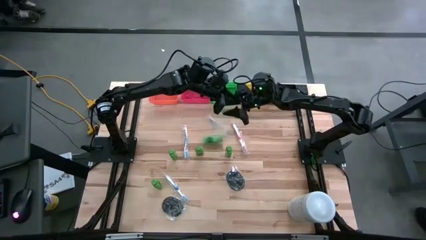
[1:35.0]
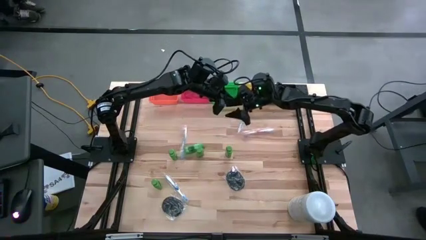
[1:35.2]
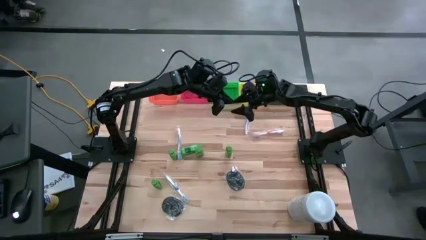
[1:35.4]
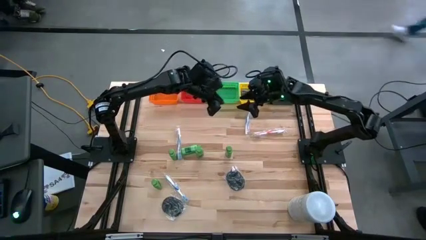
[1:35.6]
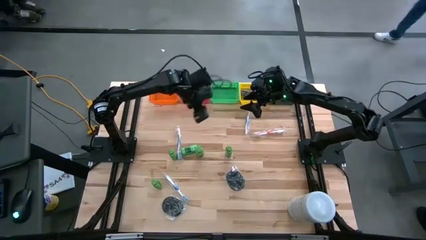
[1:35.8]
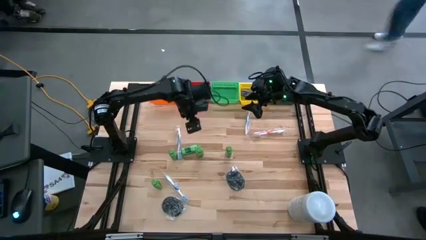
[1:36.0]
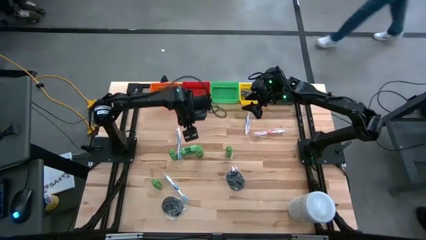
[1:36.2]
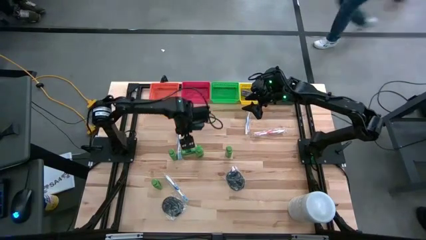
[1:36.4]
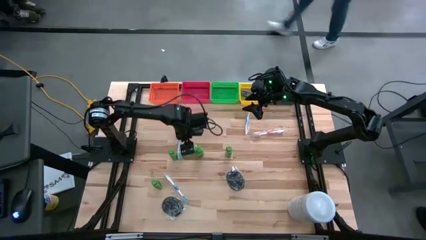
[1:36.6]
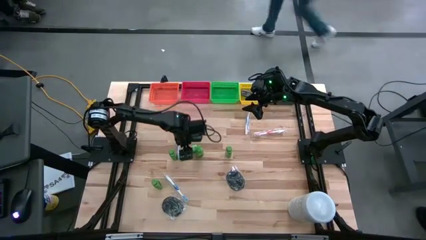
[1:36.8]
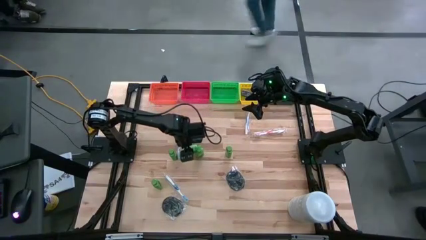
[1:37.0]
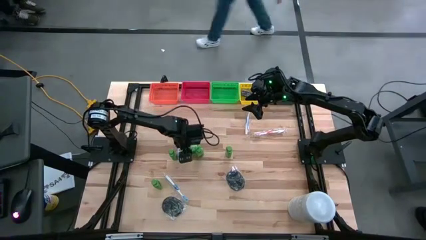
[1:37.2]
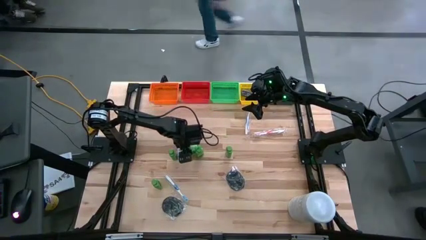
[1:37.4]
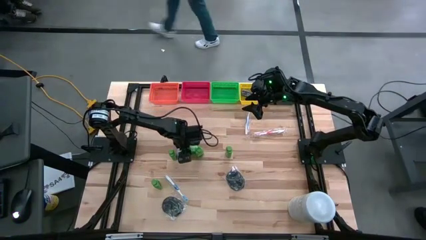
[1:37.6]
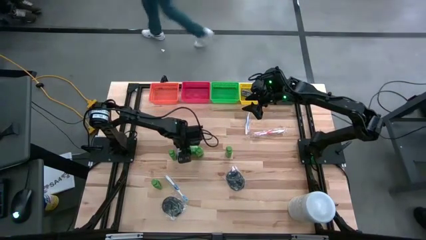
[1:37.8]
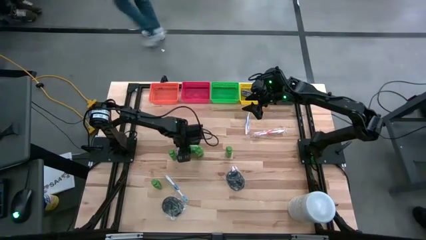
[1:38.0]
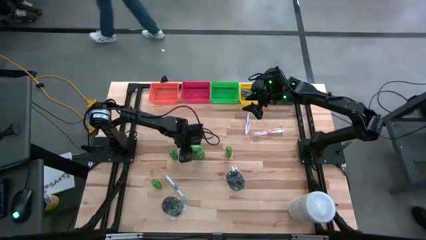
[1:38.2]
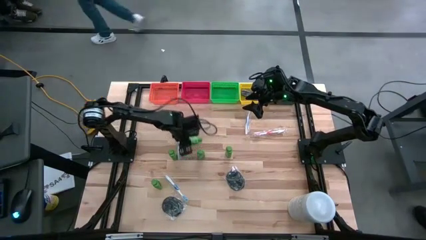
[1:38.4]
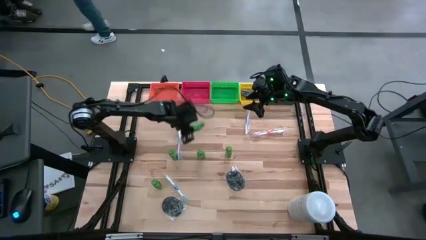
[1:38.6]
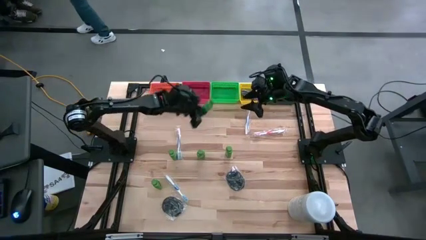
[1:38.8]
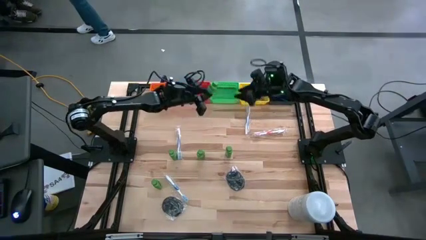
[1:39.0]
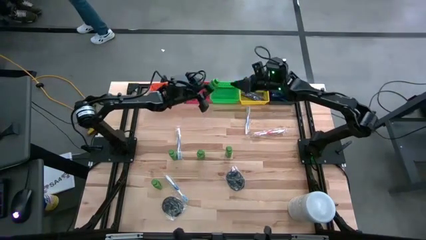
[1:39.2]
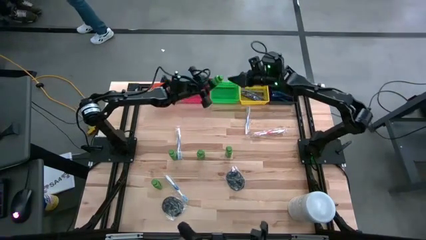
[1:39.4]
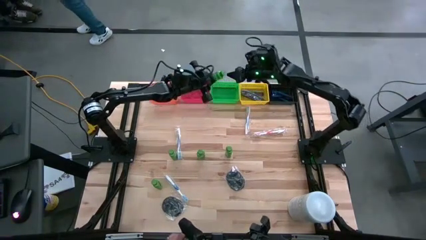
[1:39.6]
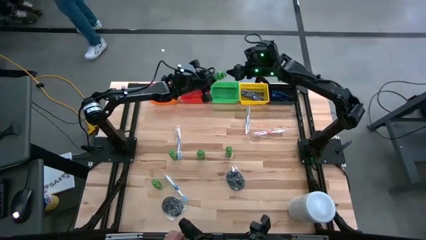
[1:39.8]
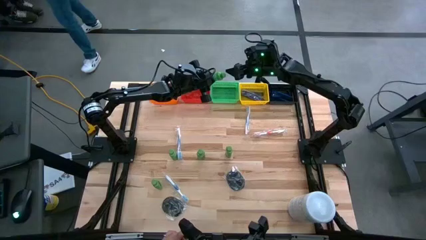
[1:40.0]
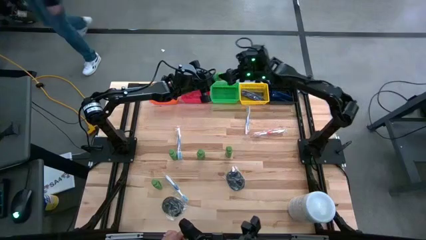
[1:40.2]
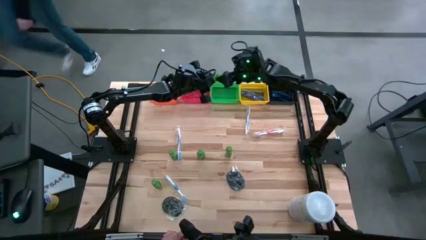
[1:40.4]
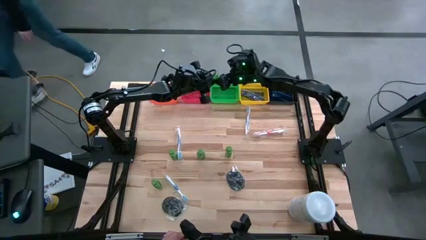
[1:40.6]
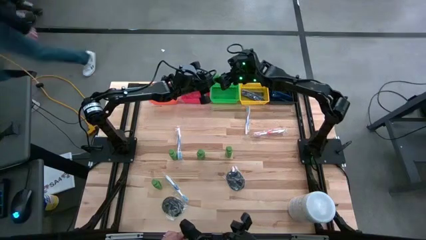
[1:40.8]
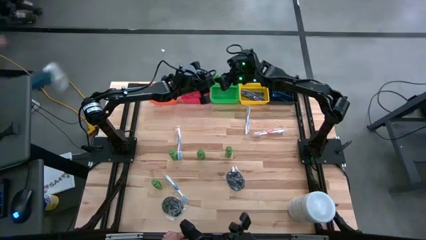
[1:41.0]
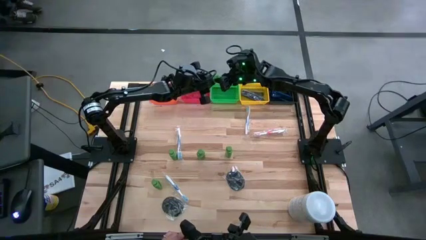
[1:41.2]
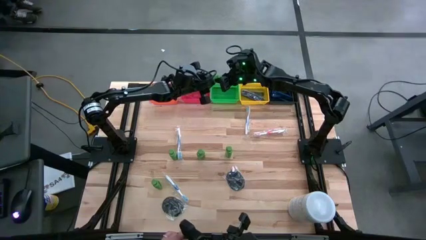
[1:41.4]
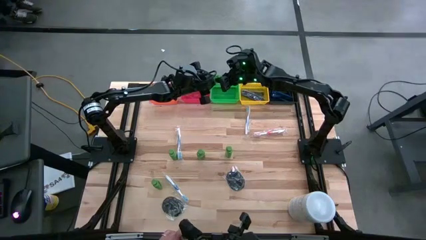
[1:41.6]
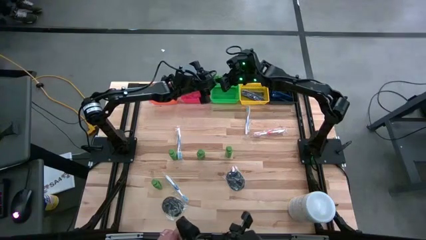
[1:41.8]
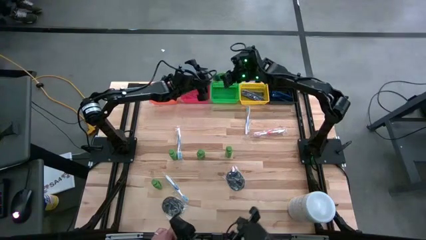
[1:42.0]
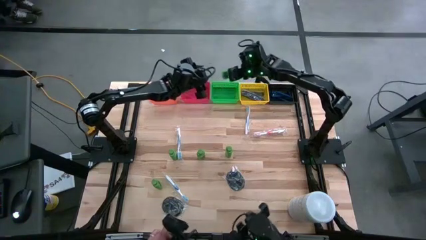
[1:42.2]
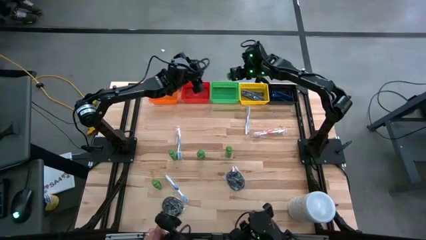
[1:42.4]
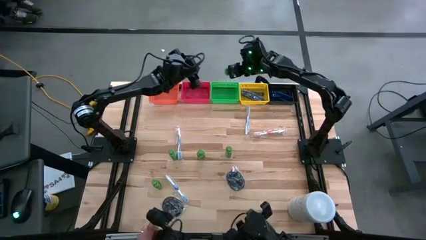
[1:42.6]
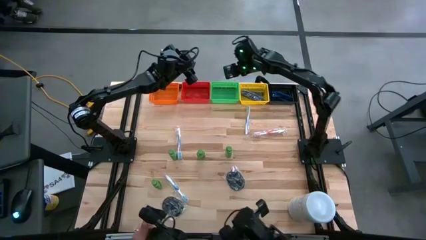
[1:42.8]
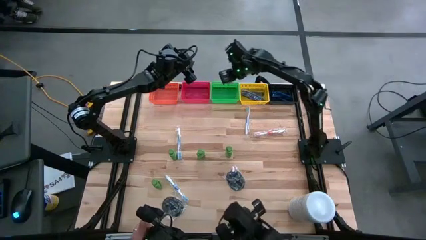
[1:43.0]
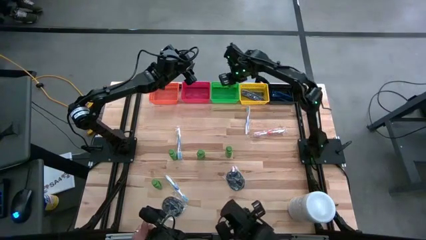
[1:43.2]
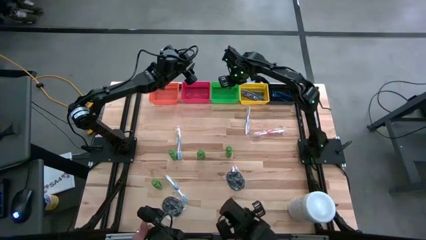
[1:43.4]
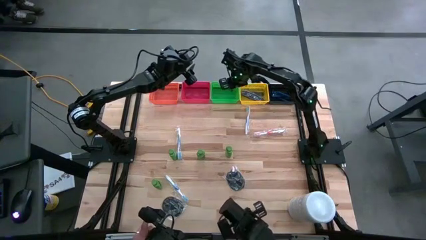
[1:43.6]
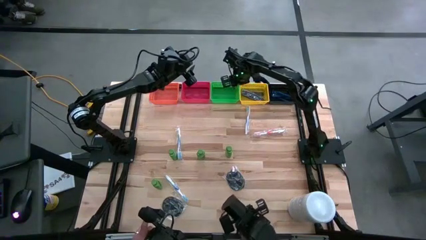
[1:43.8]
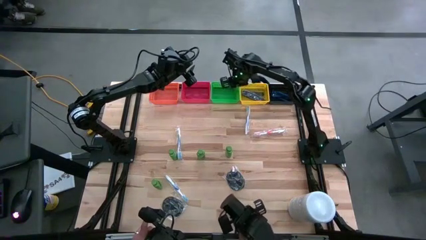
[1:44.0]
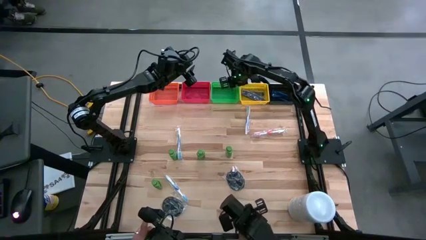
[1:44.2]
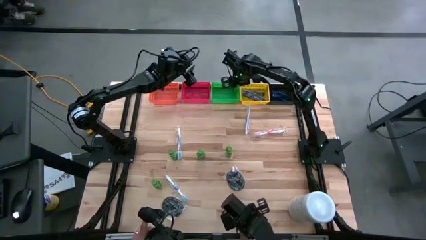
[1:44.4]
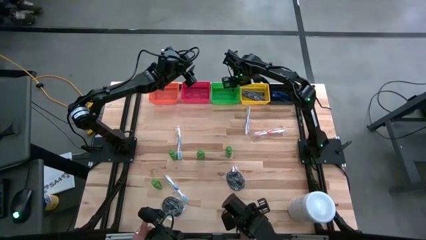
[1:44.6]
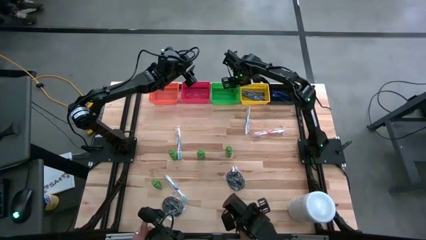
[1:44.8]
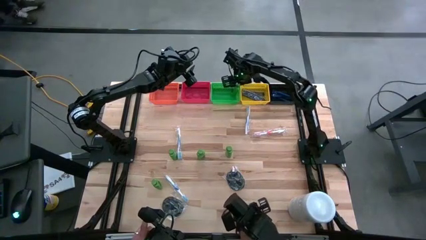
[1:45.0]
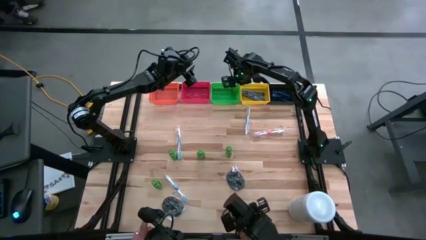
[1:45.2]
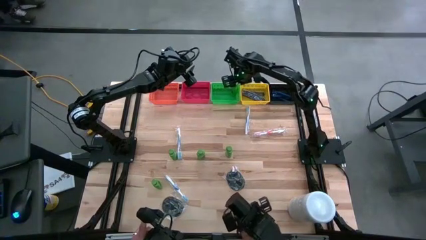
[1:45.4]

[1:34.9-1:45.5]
Task: Pick & Place Travel size toiletries
Put the green shampoo into the green bin

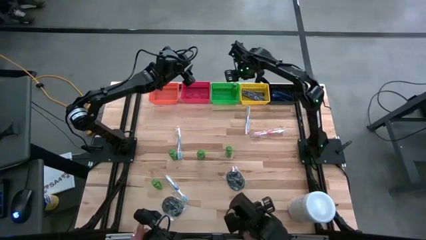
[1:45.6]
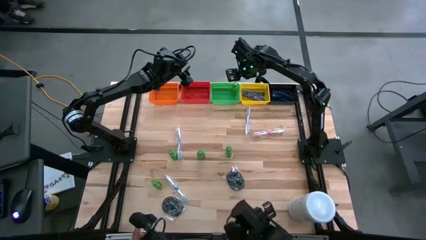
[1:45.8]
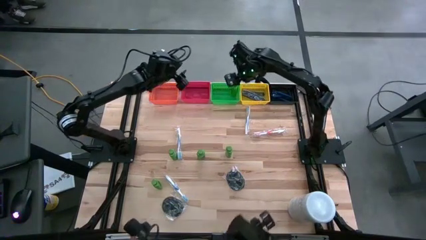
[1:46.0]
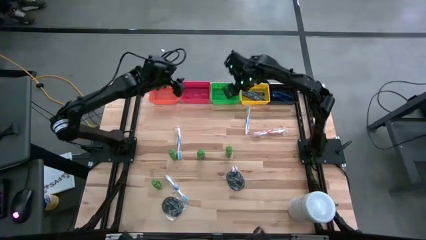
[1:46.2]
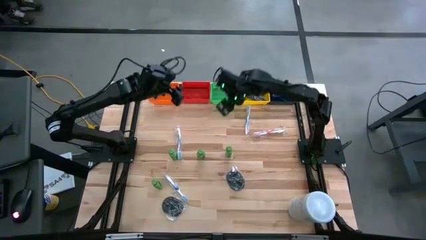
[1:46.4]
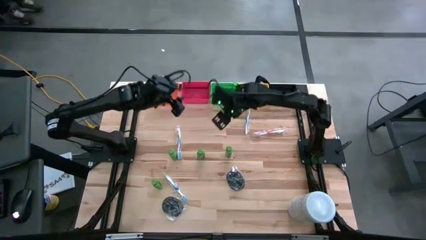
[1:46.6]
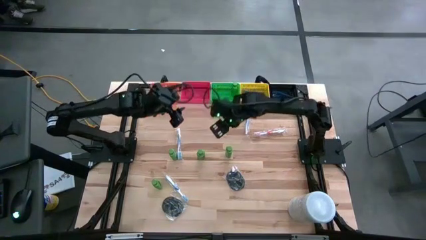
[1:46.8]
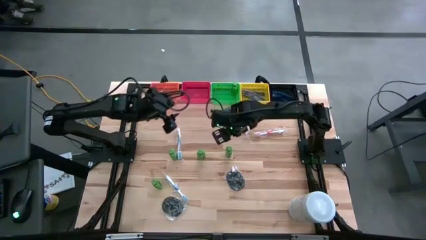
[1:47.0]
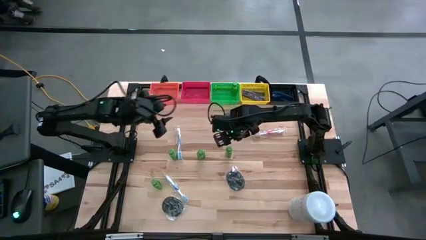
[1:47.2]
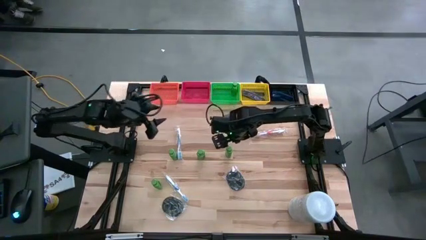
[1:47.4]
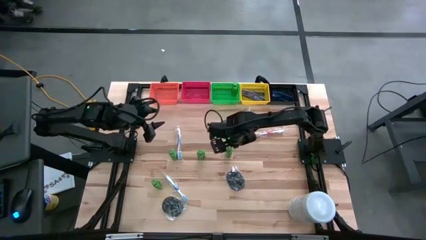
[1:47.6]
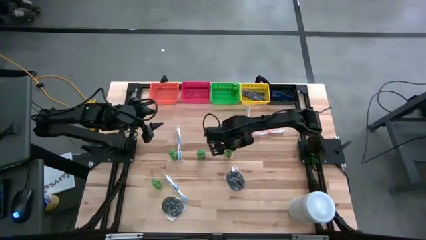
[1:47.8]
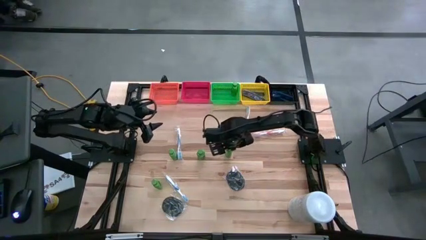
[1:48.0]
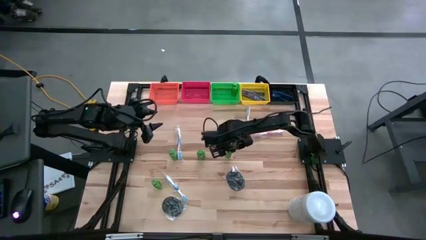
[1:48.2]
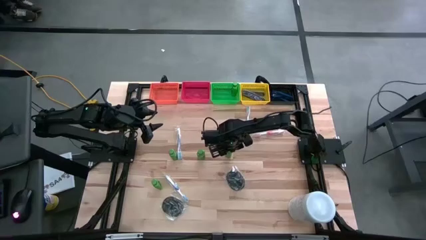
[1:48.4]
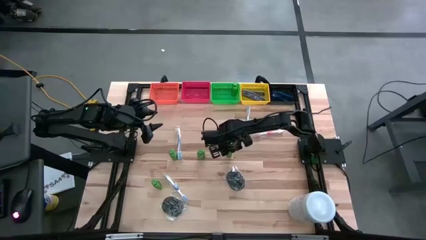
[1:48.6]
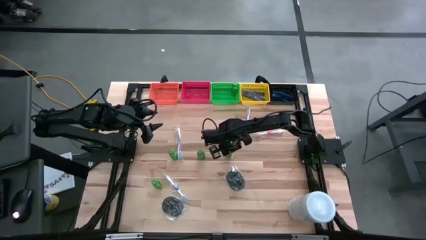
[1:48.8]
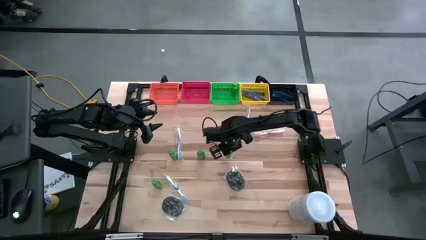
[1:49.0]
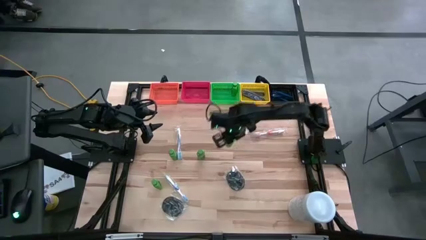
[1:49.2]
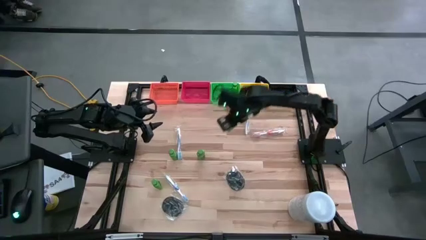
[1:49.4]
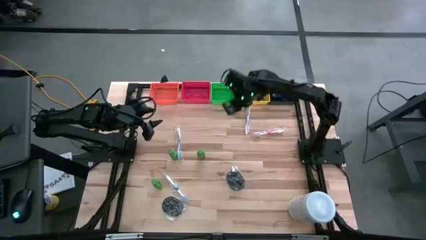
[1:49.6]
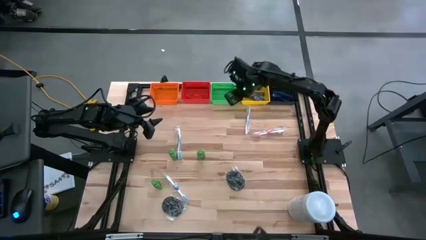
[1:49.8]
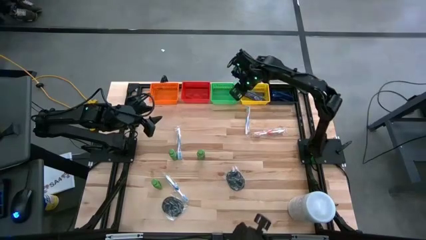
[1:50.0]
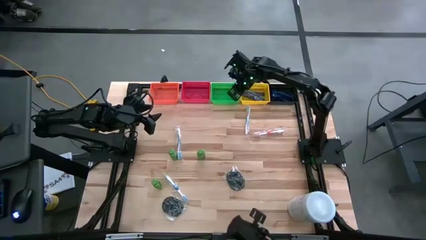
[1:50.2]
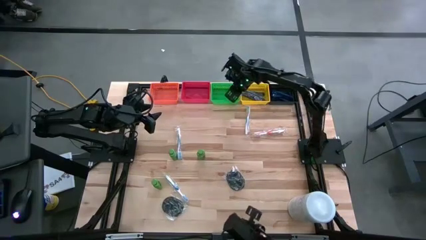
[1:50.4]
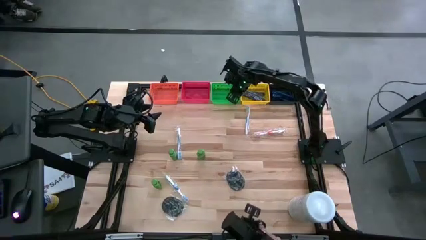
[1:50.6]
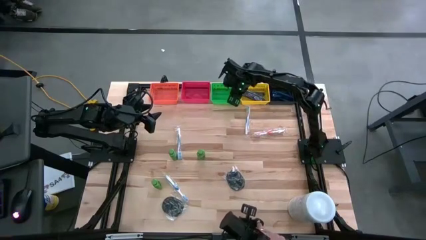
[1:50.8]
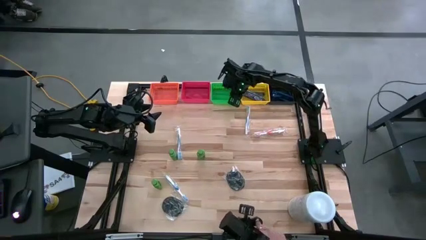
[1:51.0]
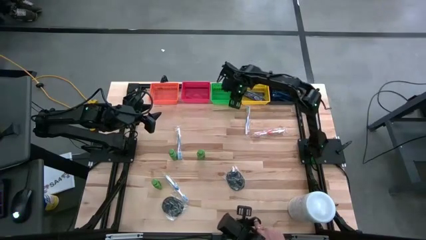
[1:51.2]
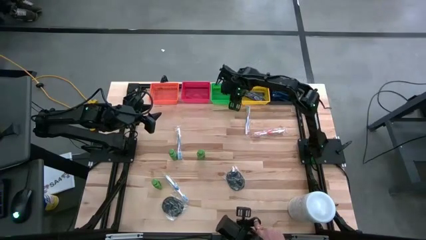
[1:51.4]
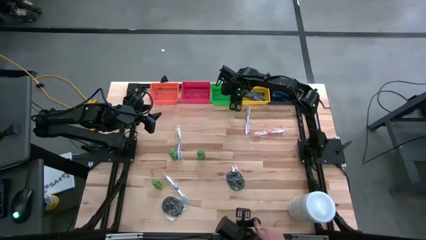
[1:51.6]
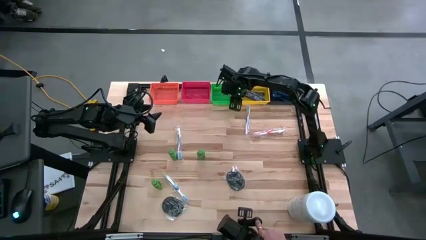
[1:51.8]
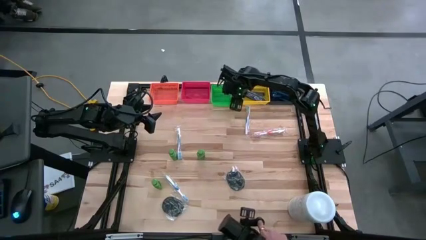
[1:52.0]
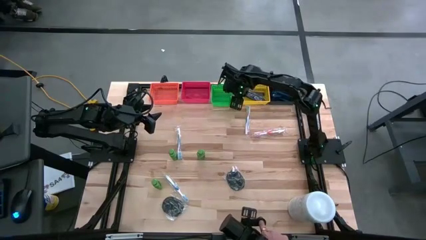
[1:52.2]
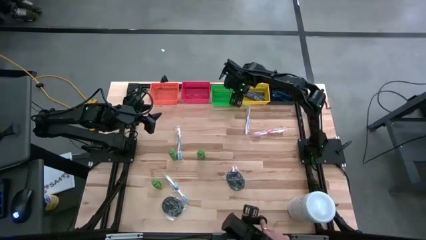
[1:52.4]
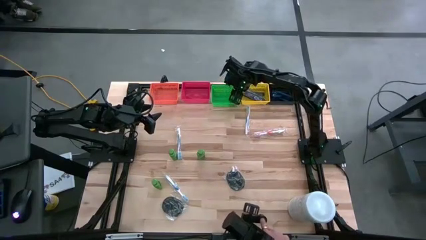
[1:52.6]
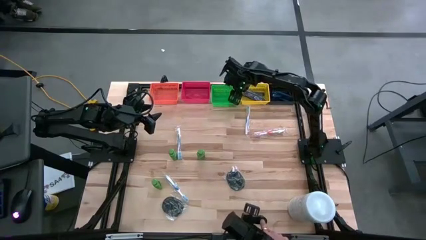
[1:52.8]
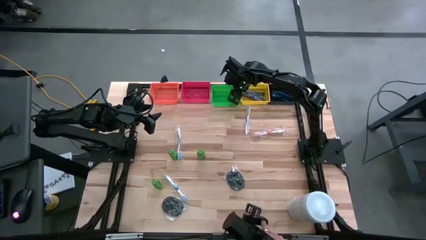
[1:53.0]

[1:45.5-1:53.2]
Put the green shampoo into the green bin
